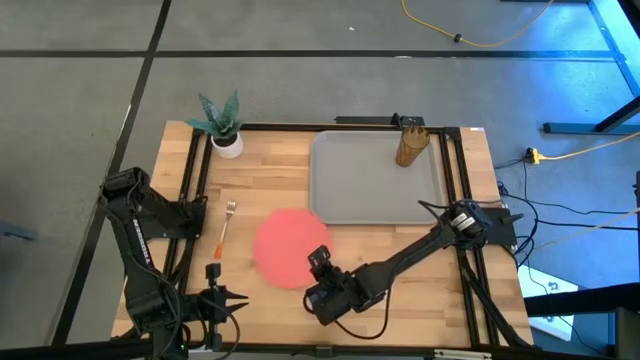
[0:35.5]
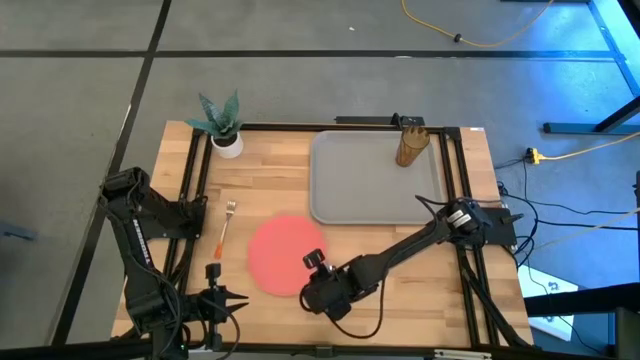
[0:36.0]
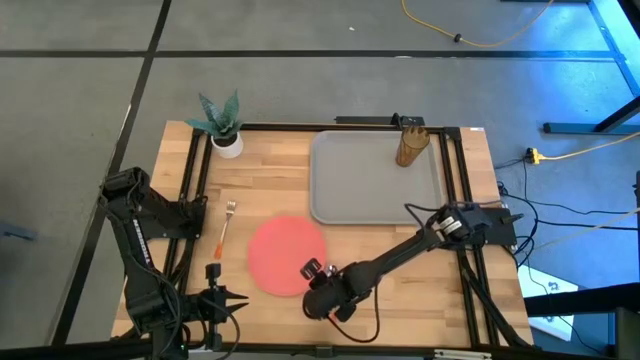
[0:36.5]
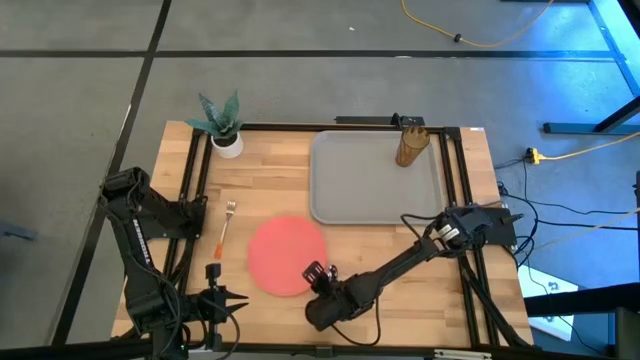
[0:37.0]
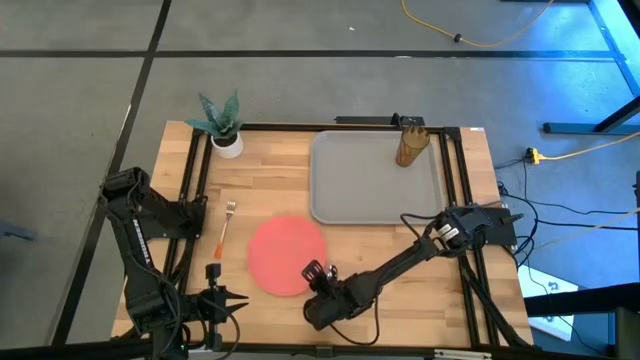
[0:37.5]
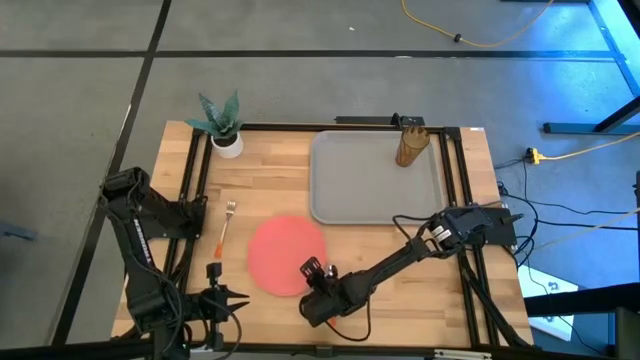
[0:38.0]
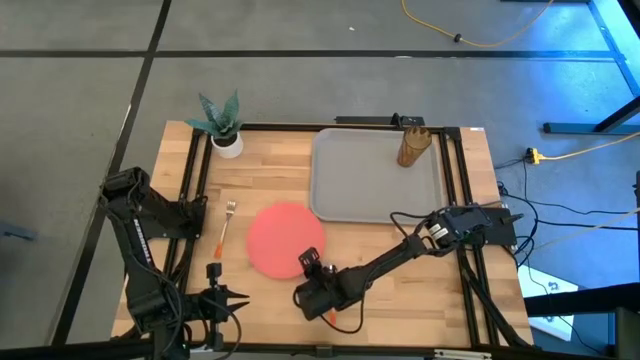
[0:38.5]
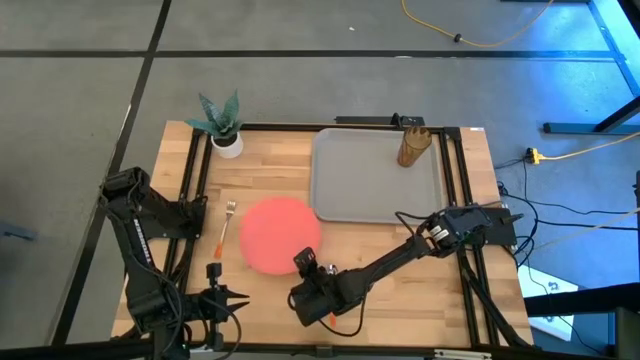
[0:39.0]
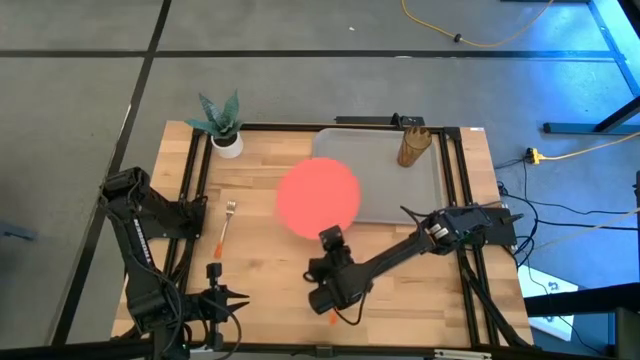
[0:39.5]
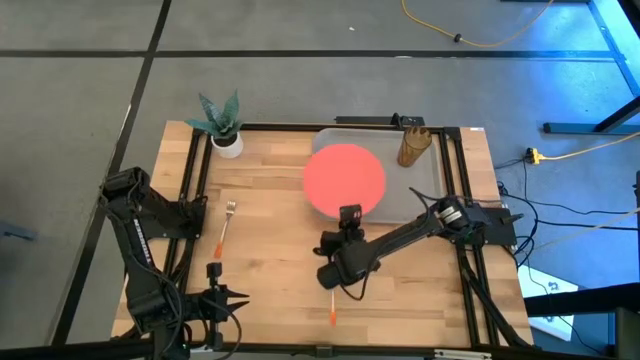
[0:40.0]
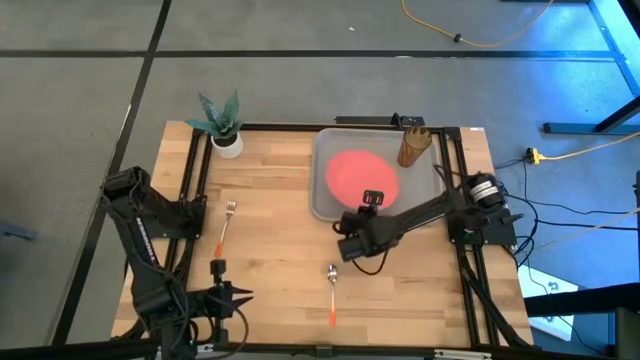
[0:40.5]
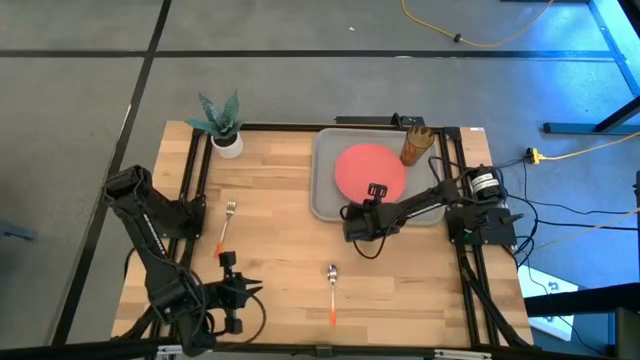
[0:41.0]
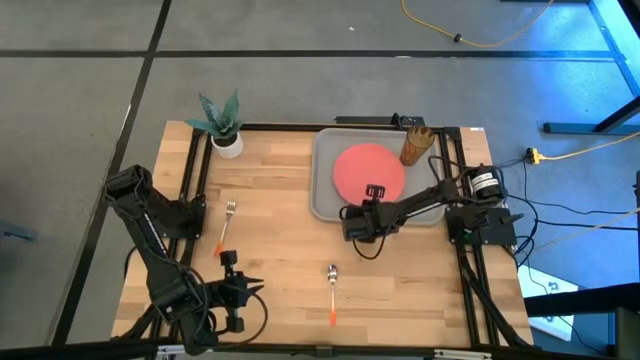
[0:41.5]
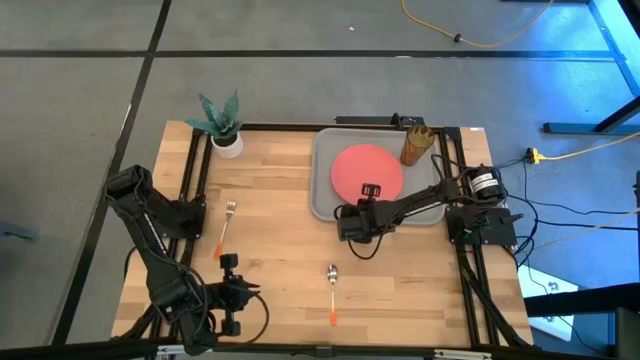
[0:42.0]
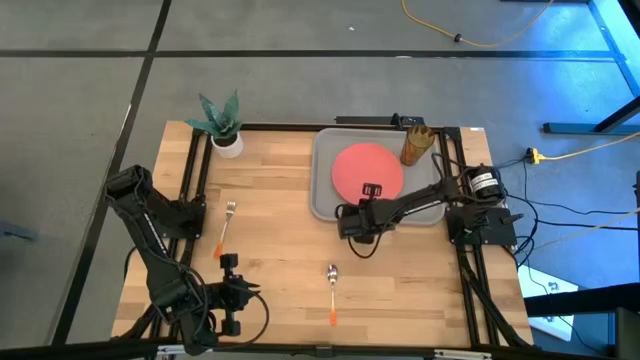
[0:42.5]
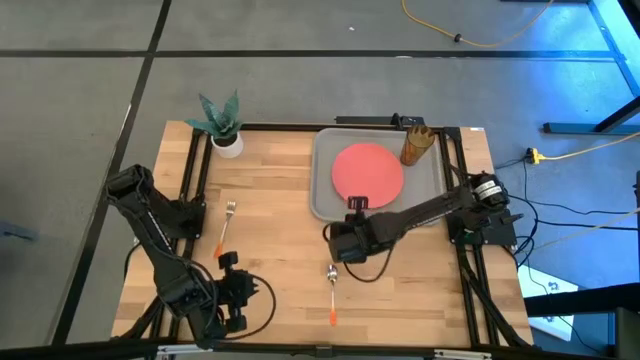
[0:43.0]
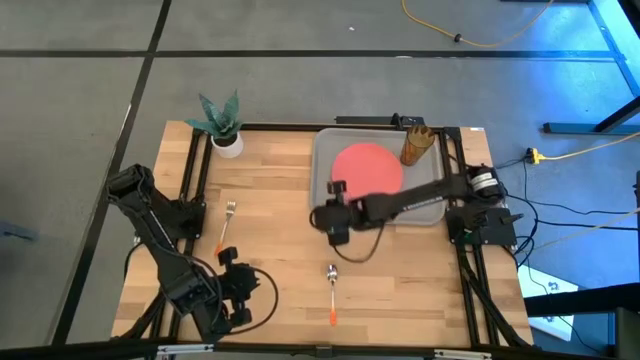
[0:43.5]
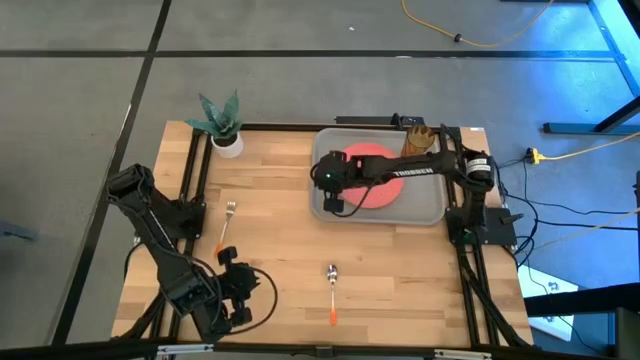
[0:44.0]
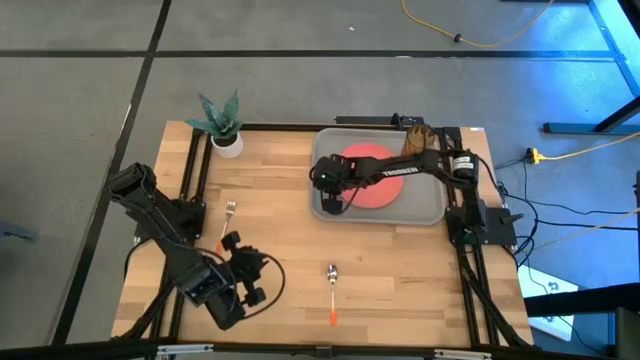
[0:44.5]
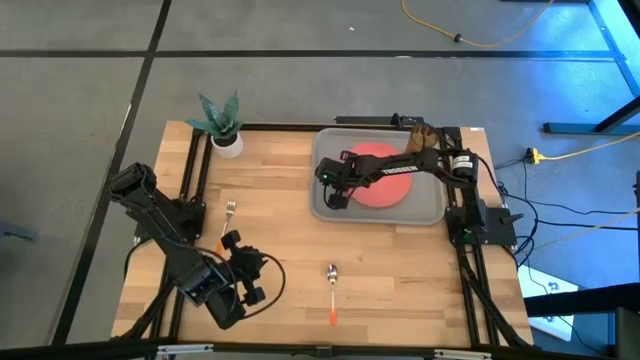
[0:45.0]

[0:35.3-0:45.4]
Task: Pick and place plate/cup/fork/spoon on tray
Put the pink plate on the gray serving tray to the bottom left of the orange glass

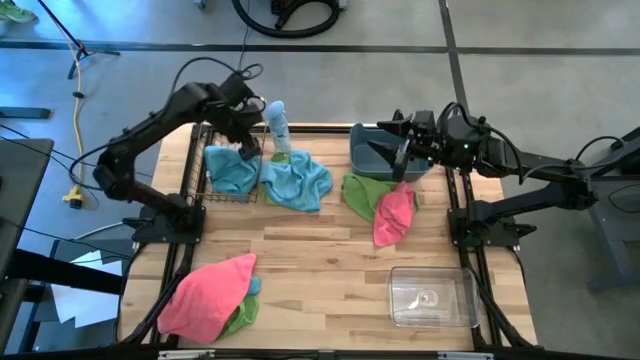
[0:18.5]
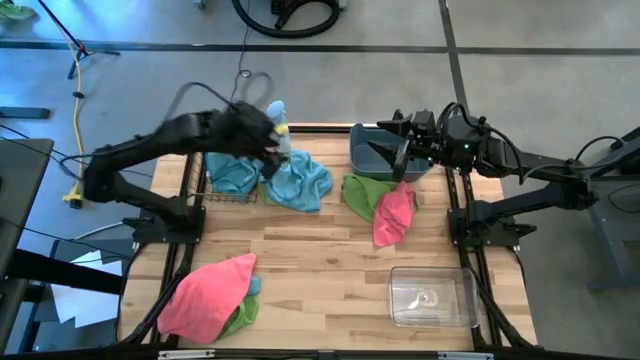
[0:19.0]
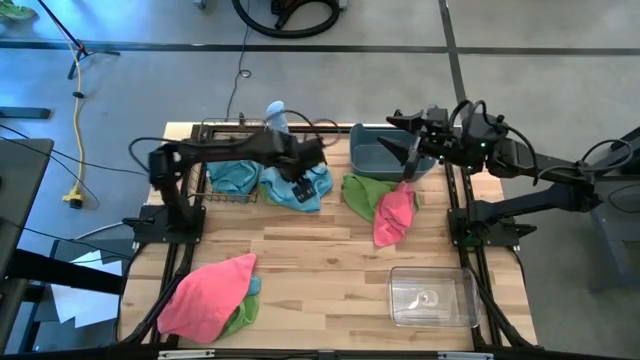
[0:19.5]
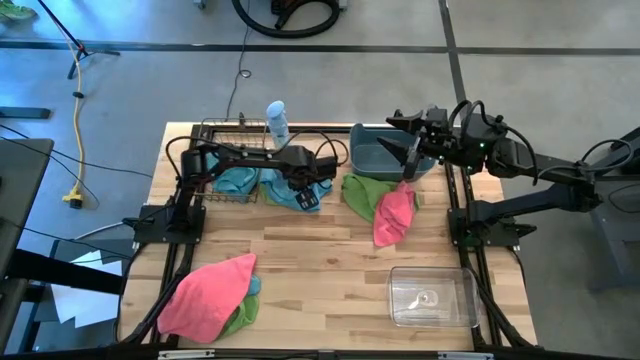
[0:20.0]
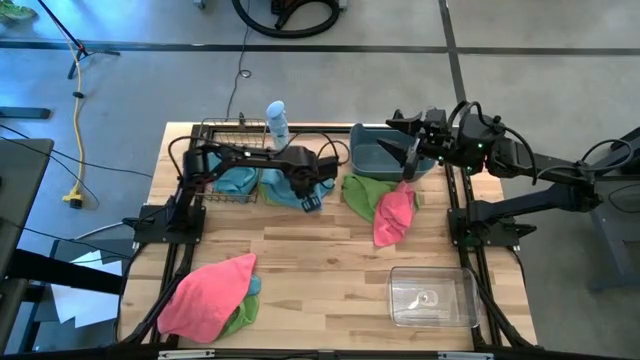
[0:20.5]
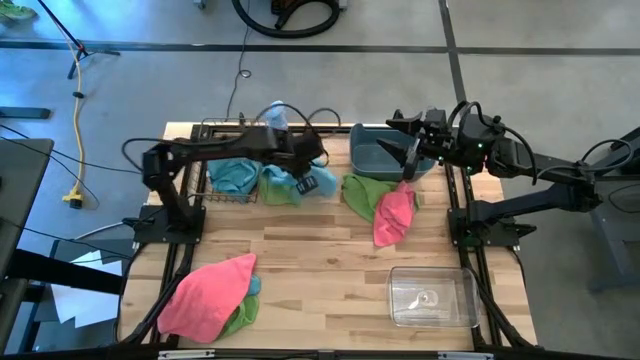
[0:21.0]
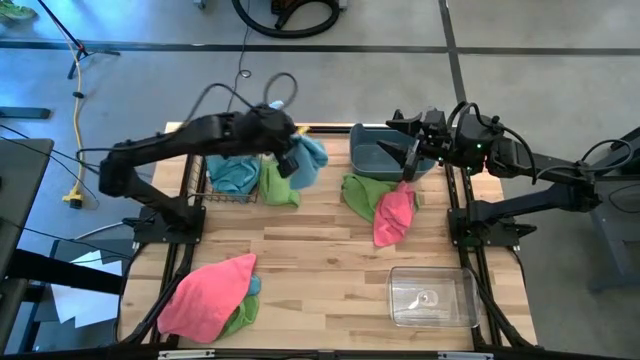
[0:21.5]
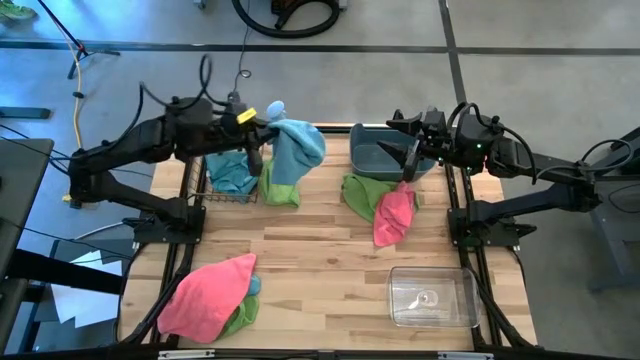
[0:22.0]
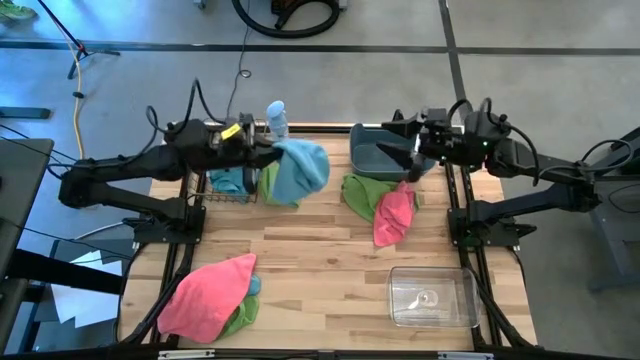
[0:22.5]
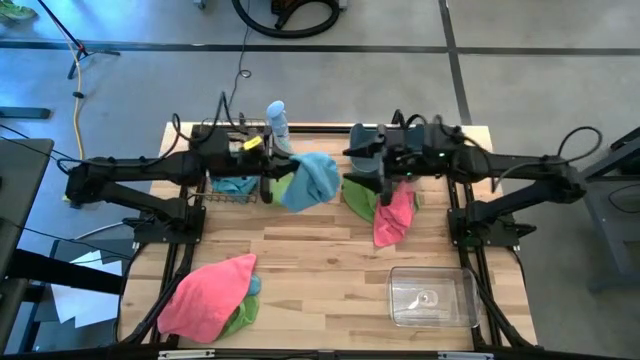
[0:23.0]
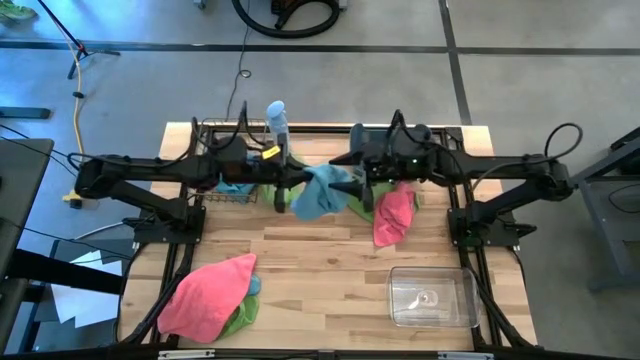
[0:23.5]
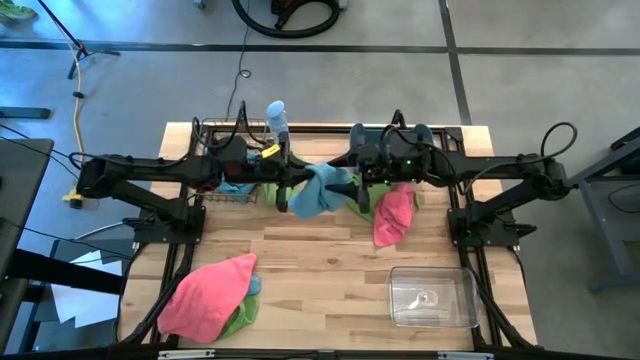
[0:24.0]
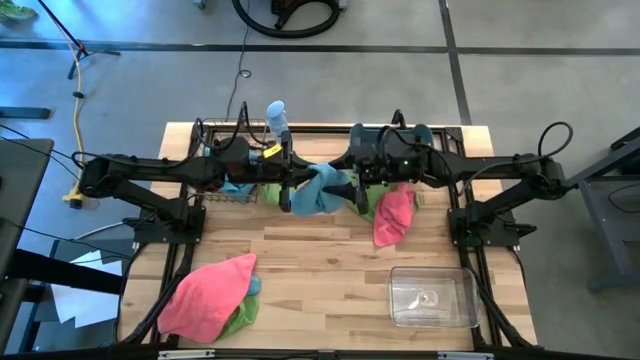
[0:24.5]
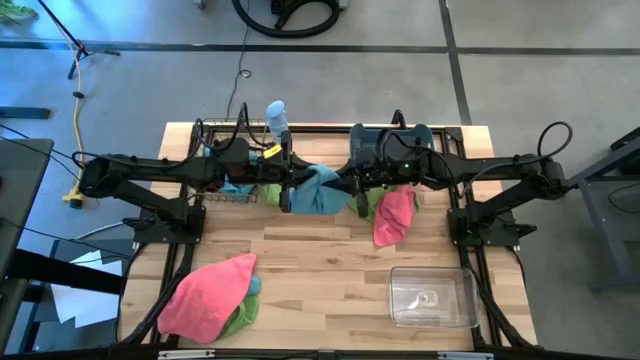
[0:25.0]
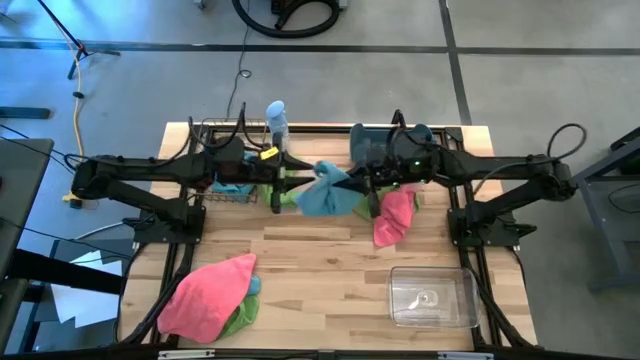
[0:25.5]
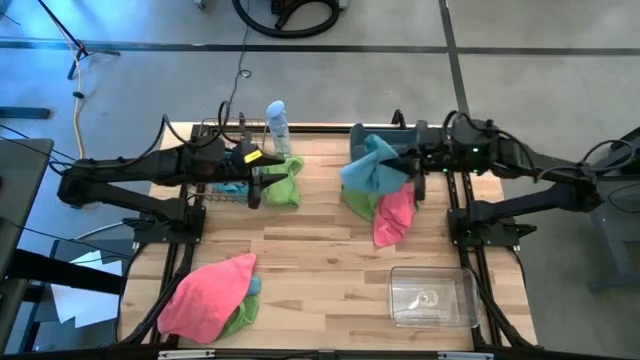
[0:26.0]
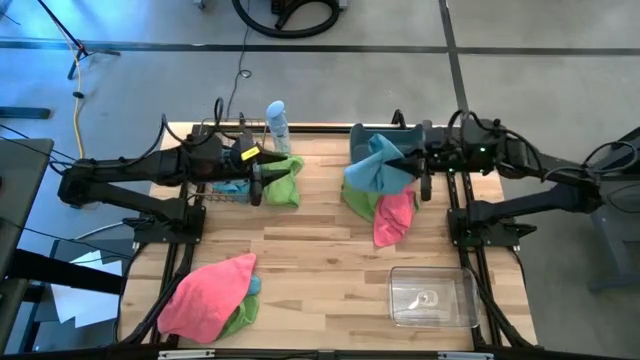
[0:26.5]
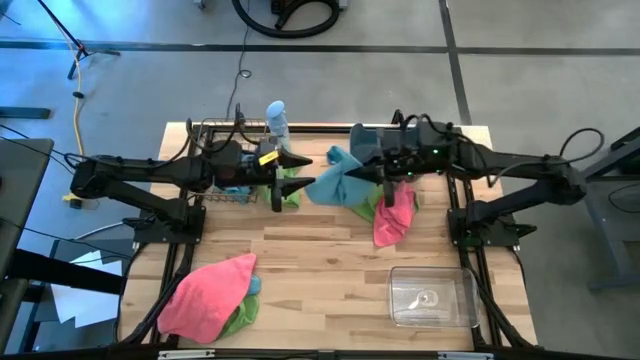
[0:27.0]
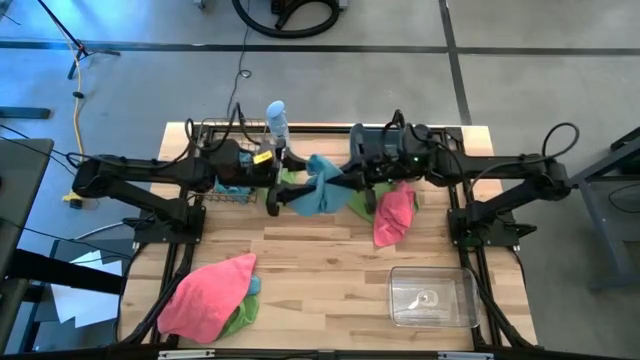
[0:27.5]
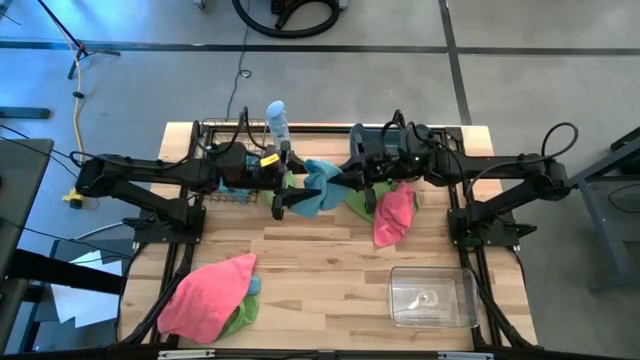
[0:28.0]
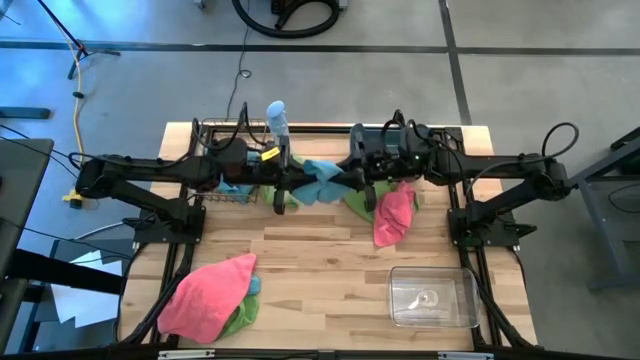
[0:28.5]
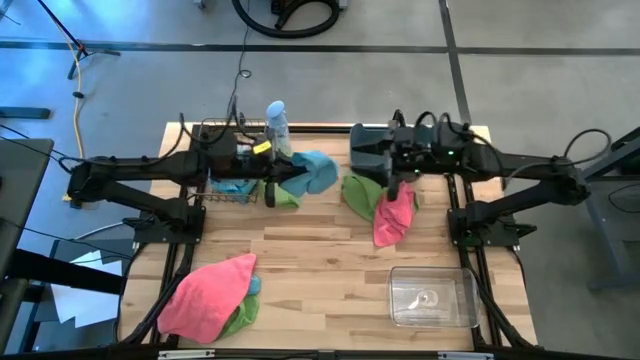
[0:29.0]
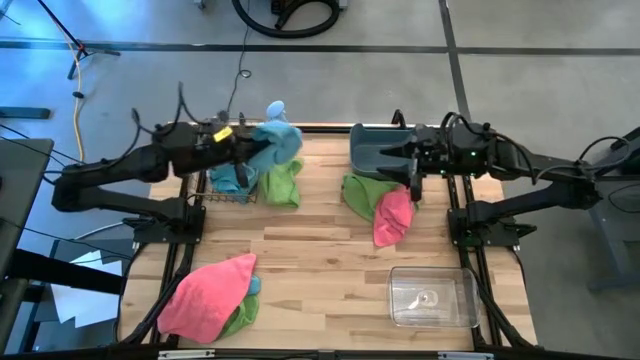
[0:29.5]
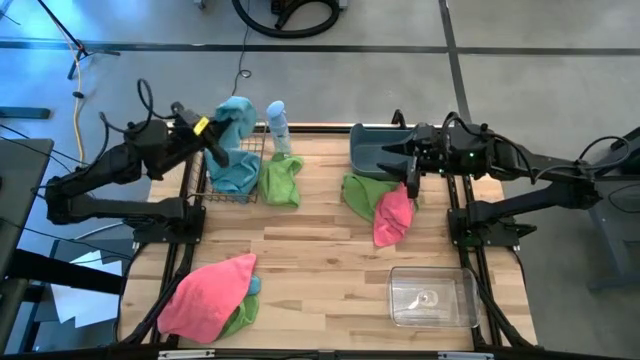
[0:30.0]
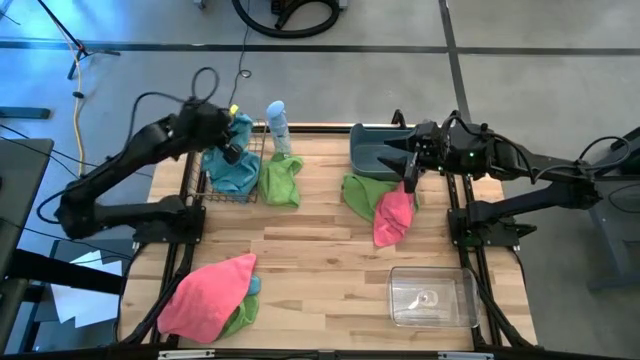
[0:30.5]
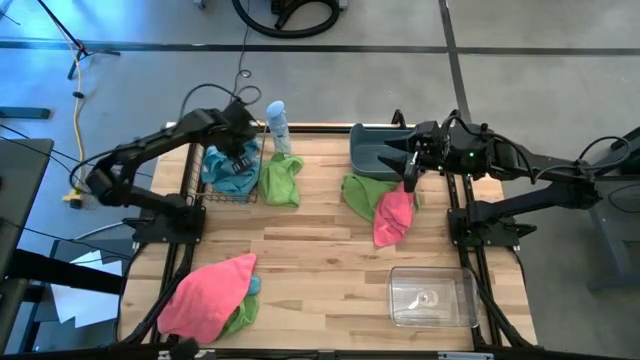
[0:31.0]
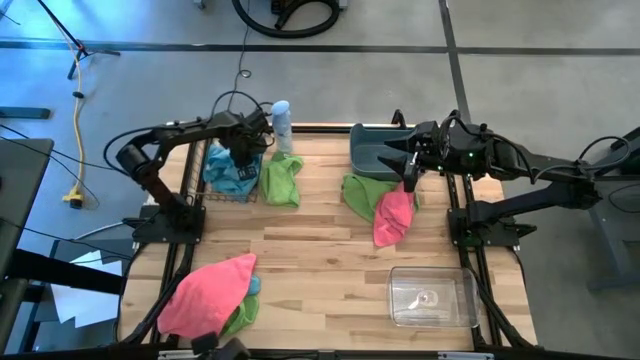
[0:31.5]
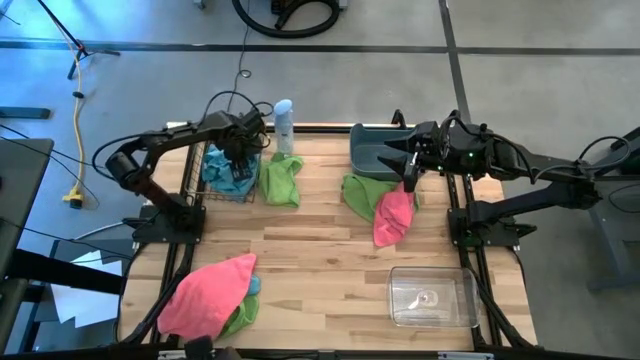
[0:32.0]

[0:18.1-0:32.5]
Task: Sort microfiber towel by color & place in baskets
Put the top blue towel into the wire basket
